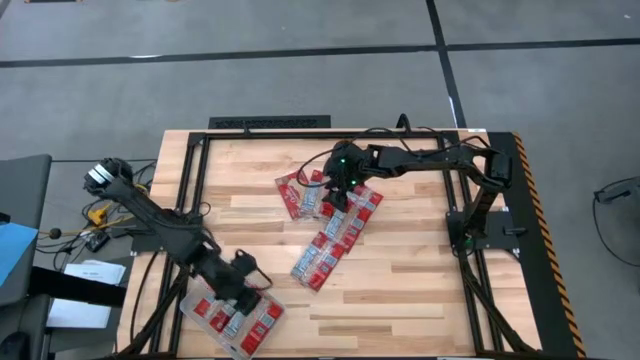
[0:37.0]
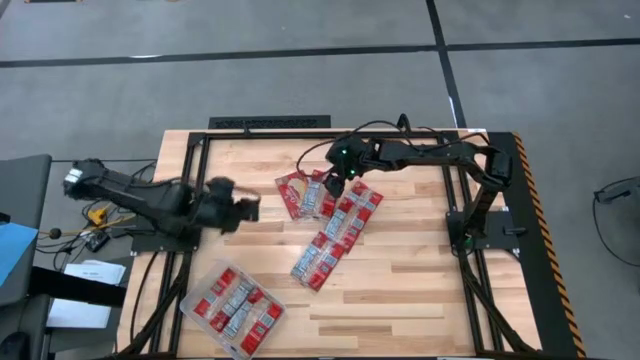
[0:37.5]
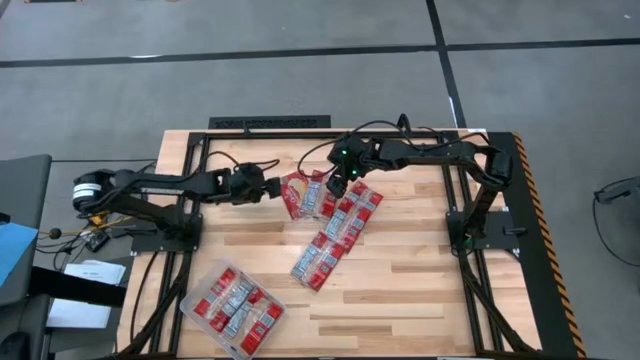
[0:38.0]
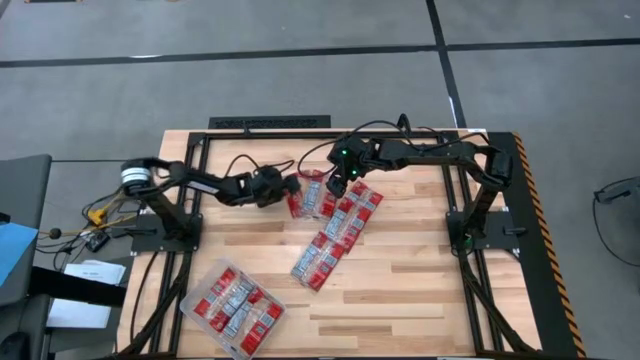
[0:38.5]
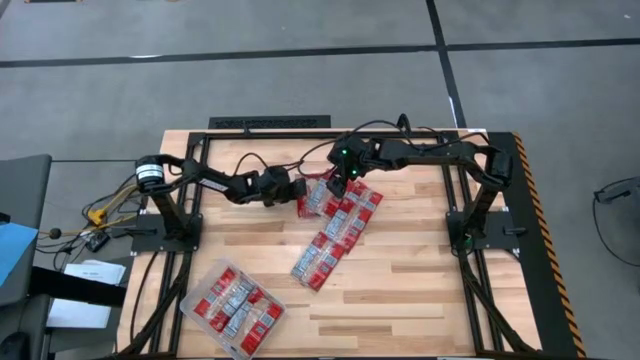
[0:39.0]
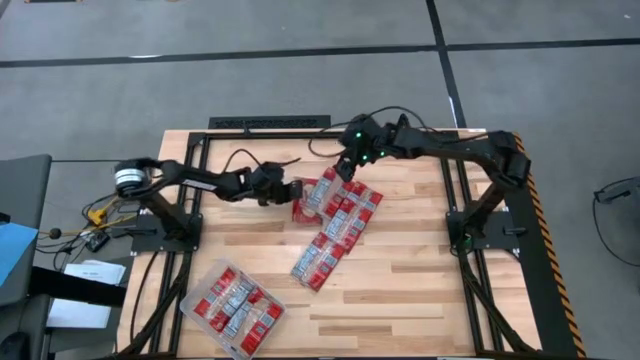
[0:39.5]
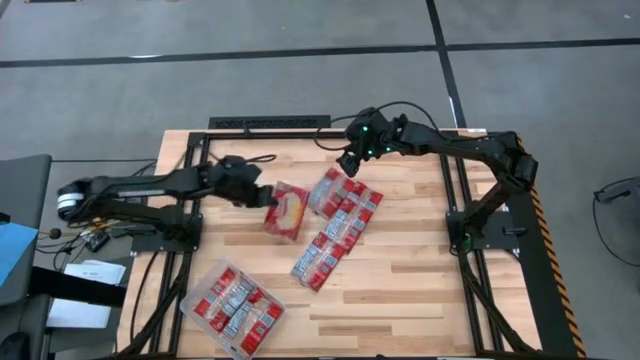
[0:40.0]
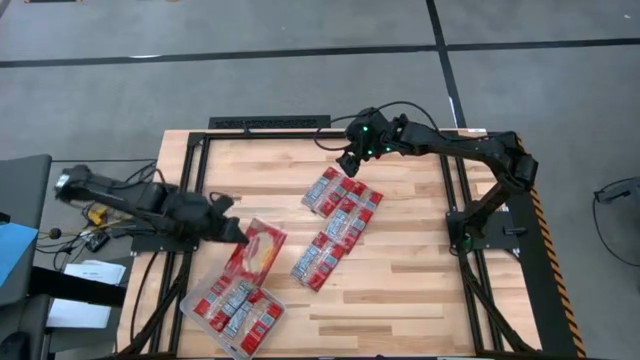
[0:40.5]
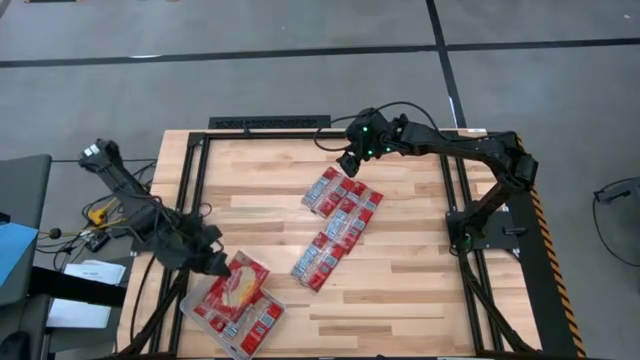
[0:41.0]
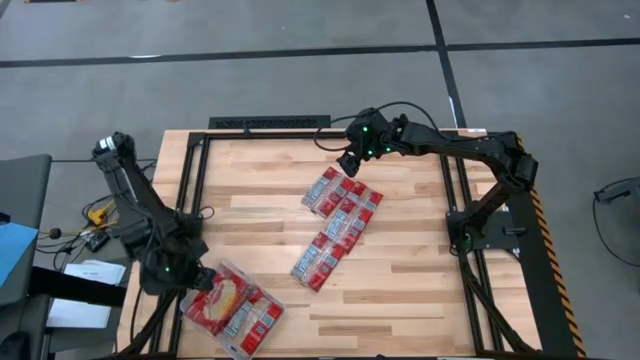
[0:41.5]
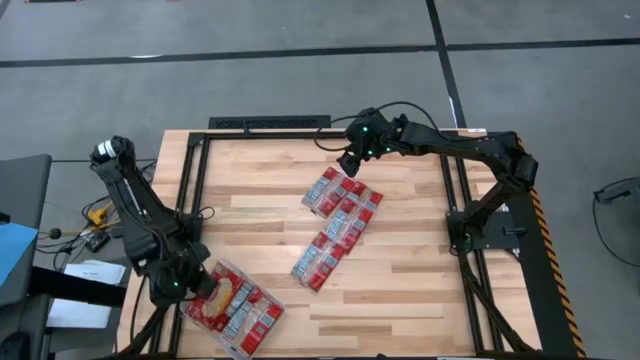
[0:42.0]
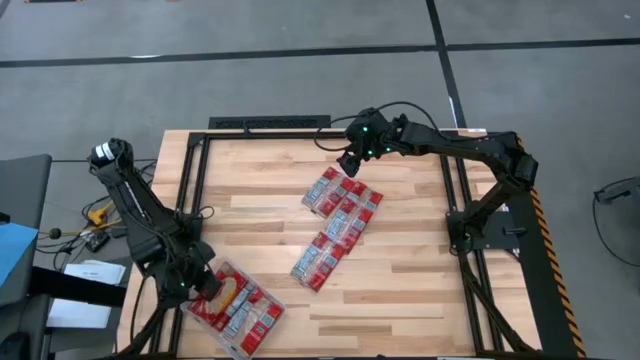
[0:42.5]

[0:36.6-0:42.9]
Task: Sort popcorn bags into baskets
Put the red popcorn bag into the transparent bin

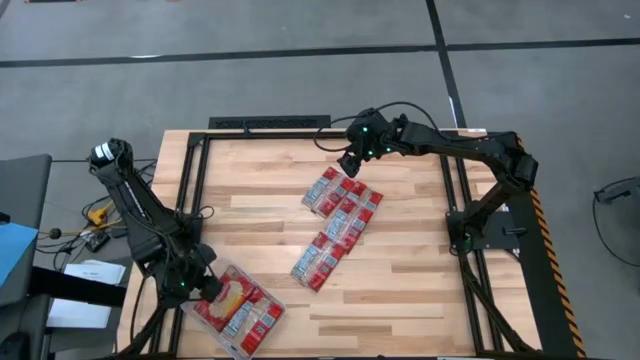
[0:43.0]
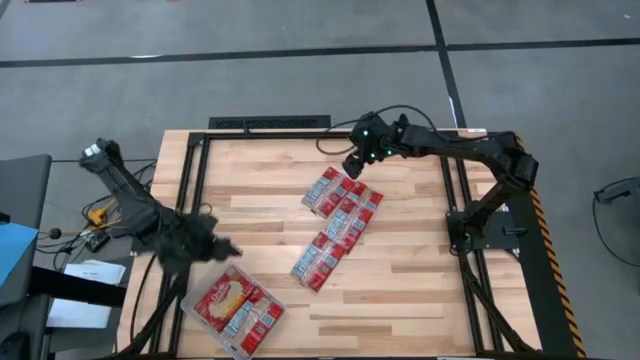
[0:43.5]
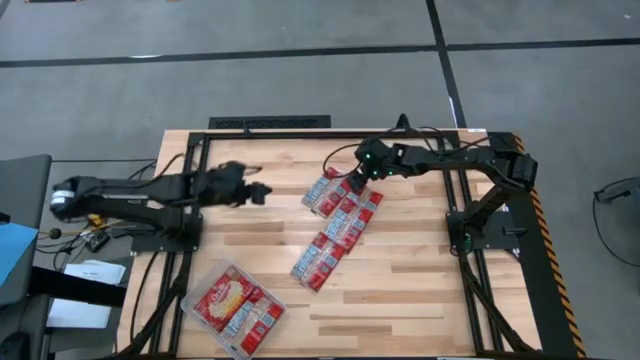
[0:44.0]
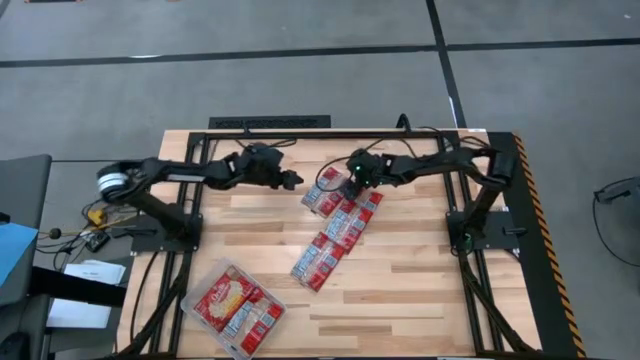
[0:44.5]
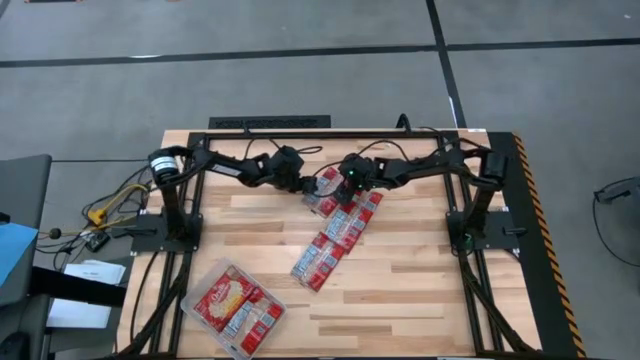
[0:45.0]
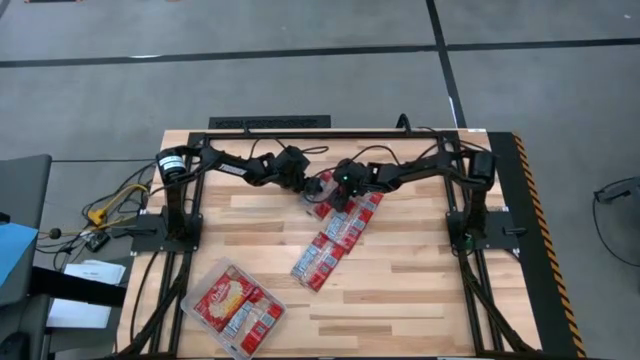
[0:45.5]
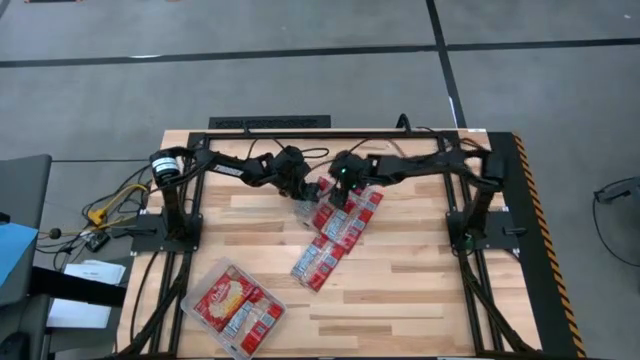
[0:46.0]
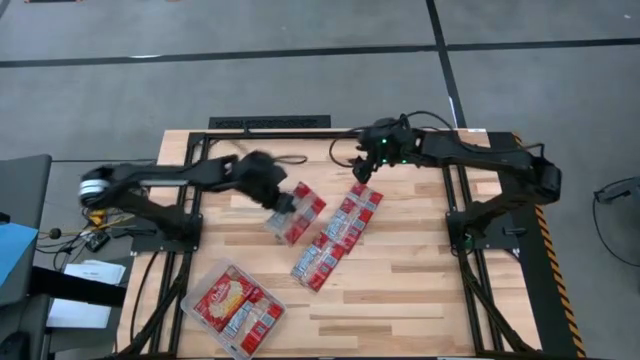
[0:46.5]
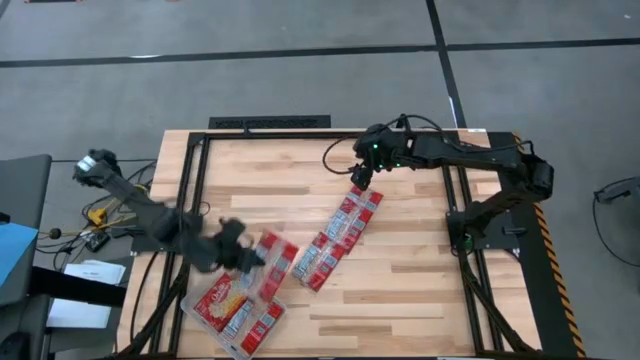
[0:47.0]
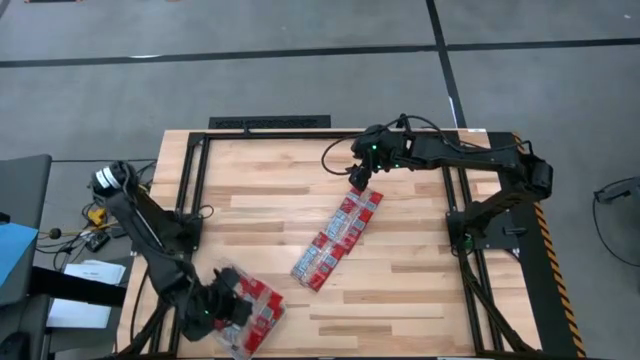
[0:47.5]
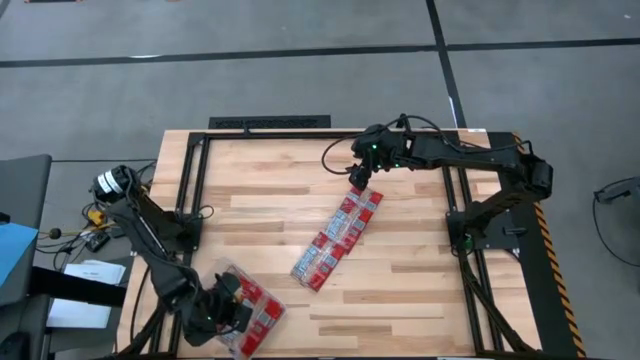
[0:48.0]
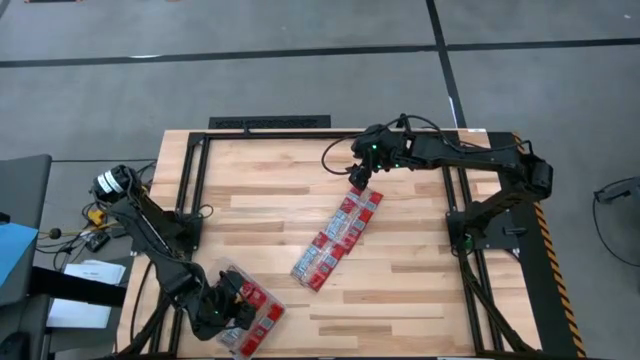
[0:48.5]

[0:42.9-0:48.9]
Put the red popcorn bag into the transparent bin

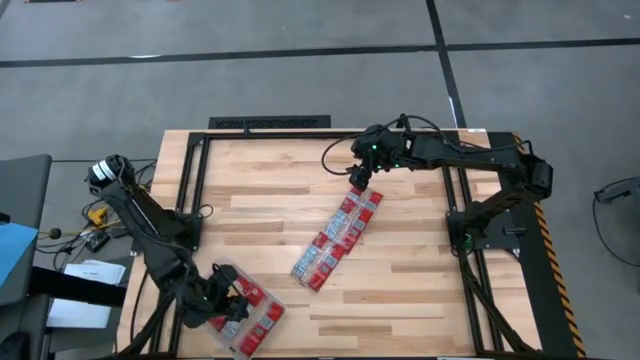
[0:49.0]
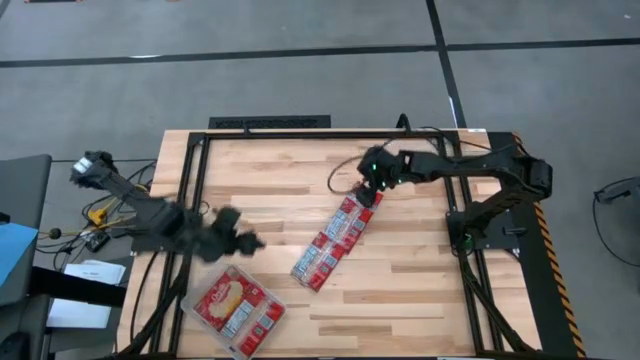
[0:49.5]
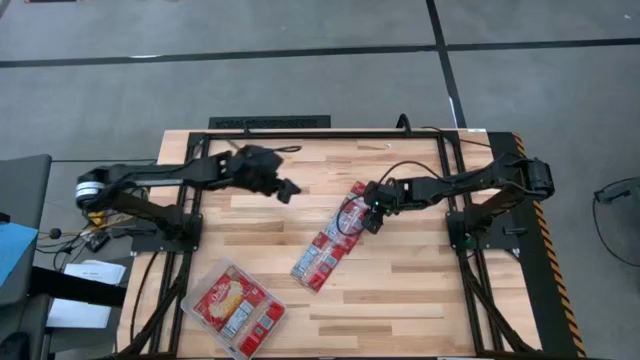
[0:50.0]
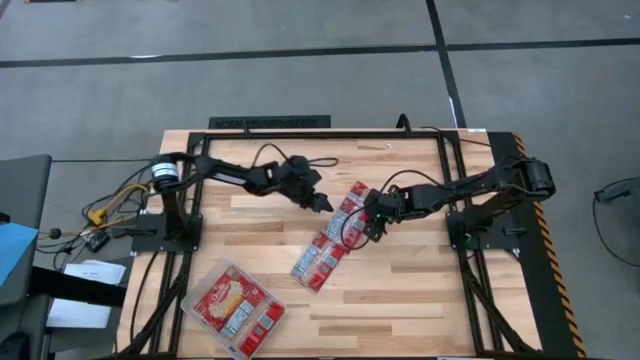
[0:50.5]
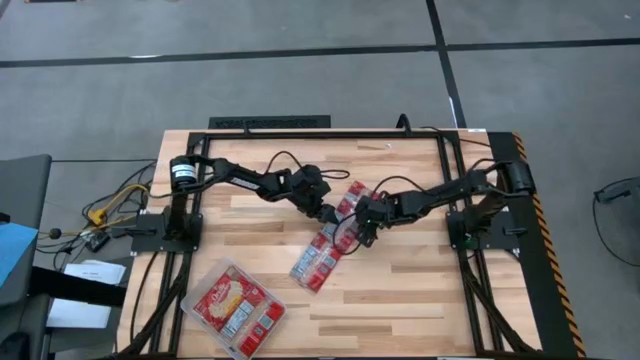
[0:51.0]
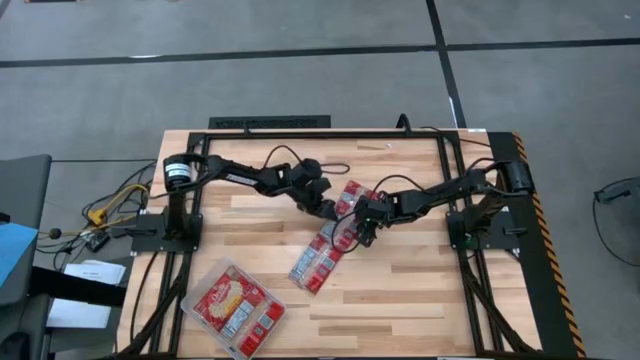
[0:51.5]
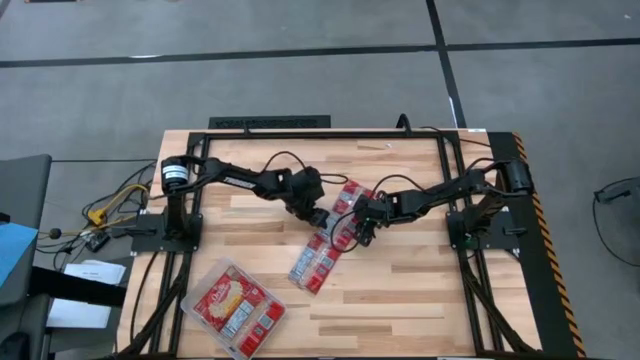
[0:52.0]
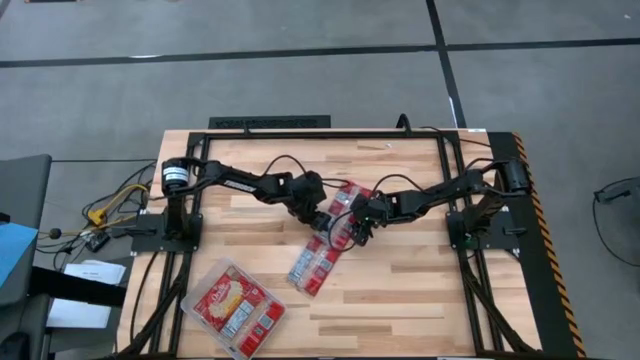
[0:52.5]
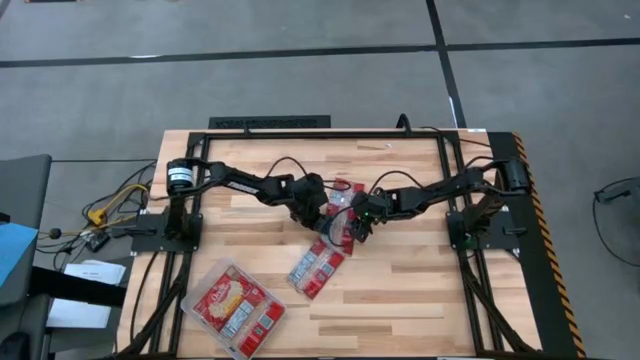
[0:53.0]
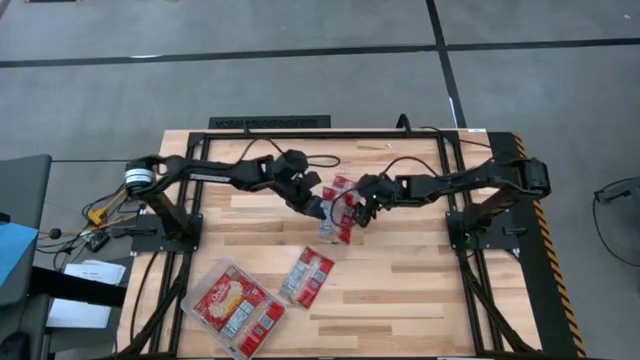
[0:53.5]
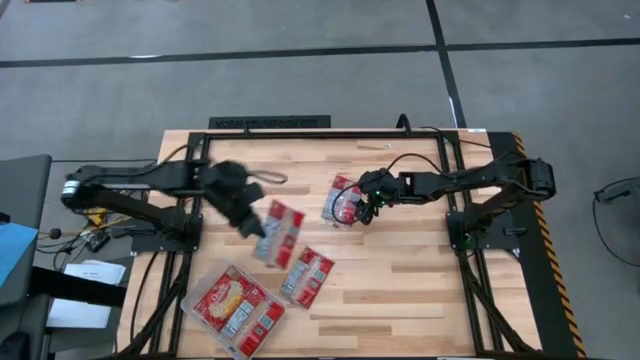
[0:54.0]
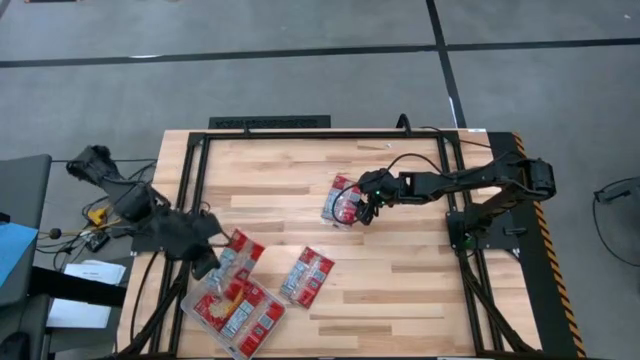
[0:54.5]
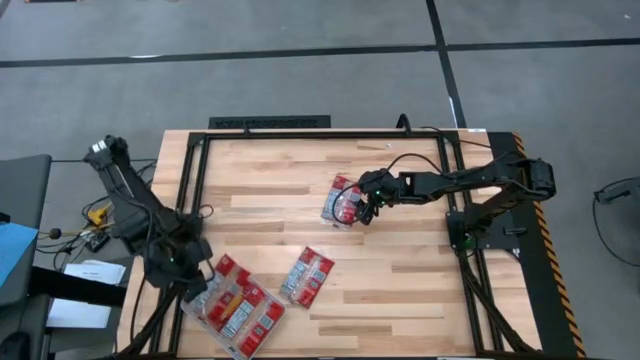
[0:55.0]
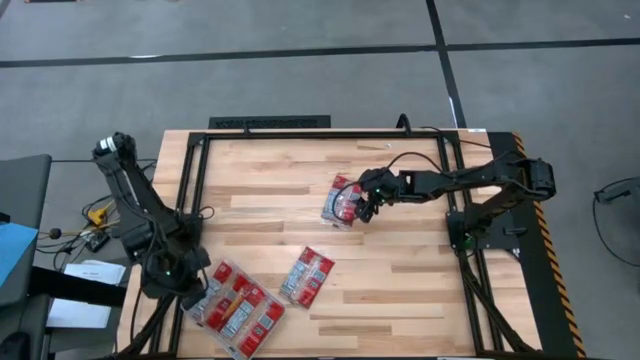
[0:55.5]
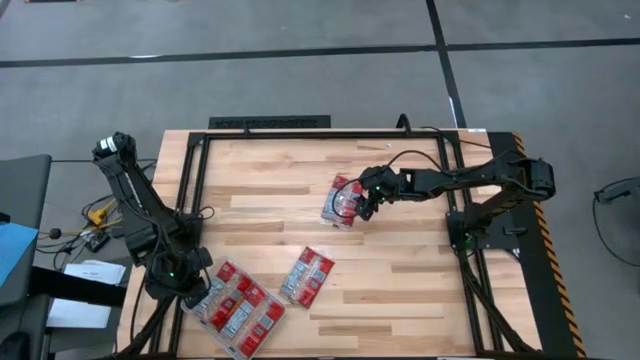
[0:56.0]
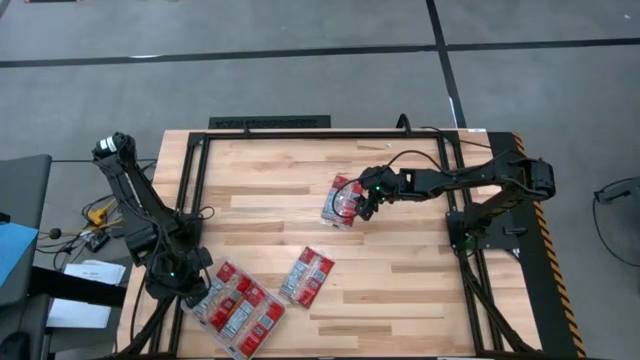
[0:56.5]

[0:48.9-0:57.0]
Put the red popcorn bag into the transparent bin

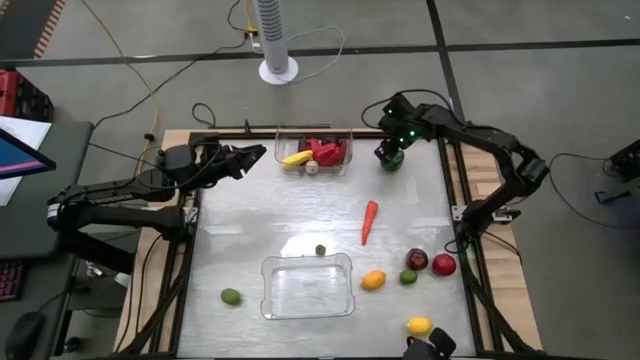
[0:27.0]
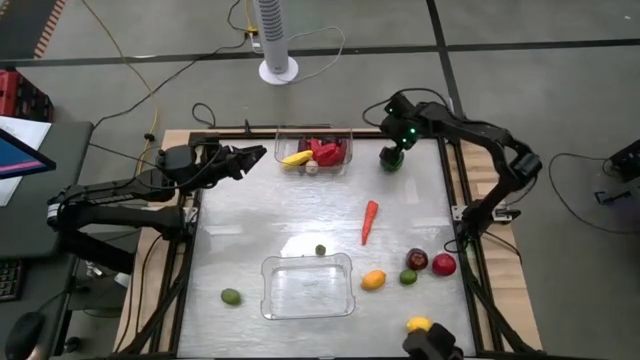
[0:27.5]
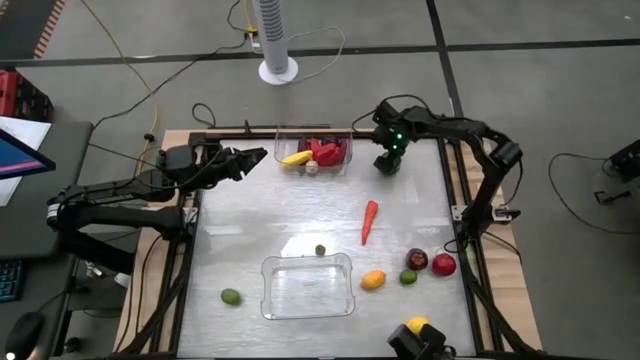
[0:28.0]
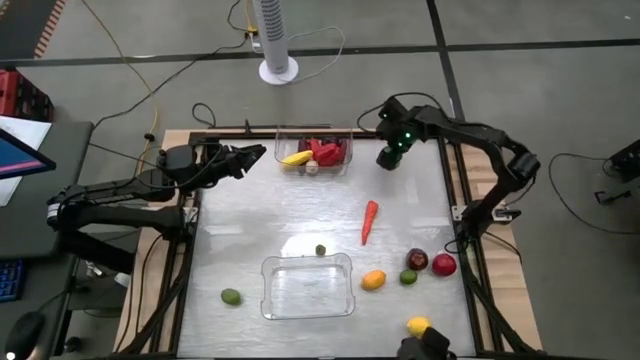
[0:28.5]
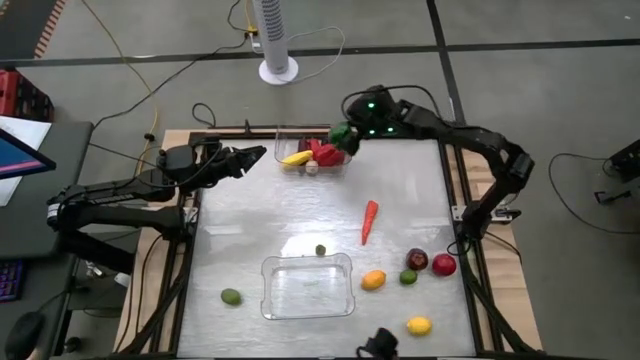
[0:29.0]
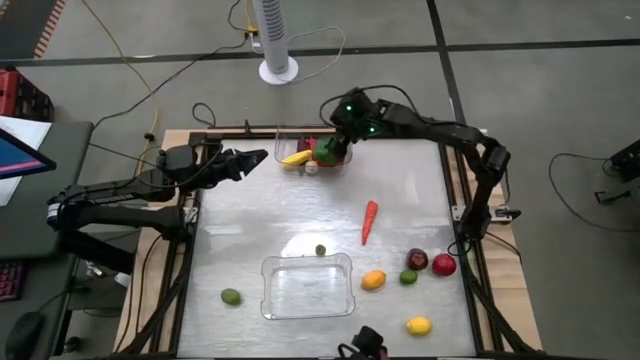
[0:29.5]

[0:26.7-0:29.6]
Task: Sort produce into baskets
Put the green bell pepper into the top transparent bin
